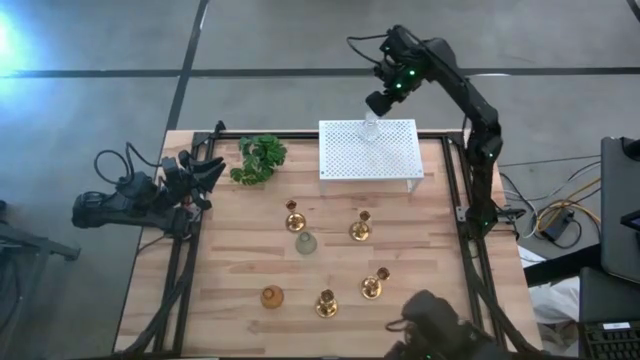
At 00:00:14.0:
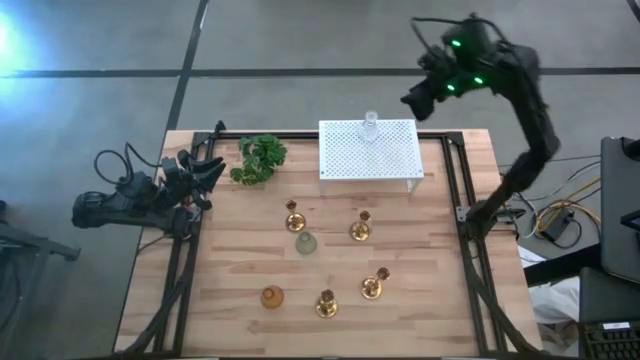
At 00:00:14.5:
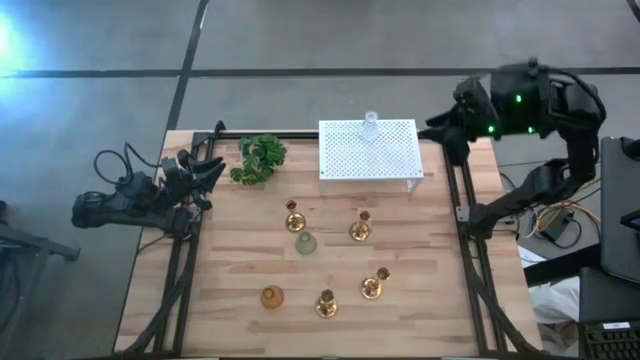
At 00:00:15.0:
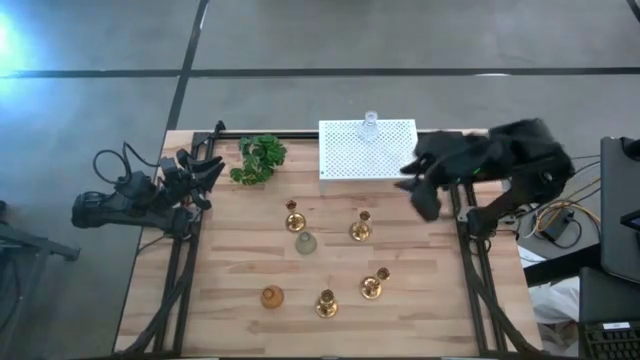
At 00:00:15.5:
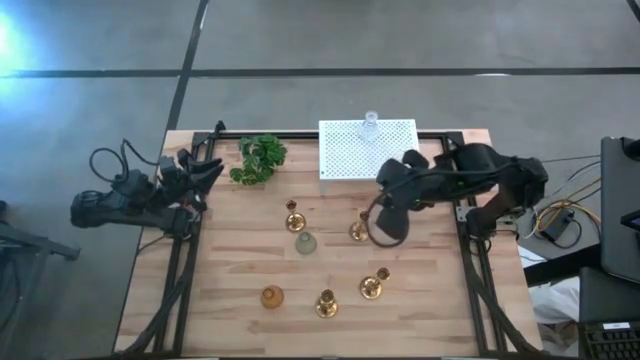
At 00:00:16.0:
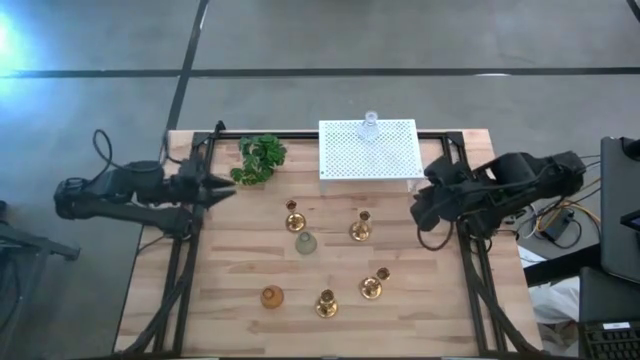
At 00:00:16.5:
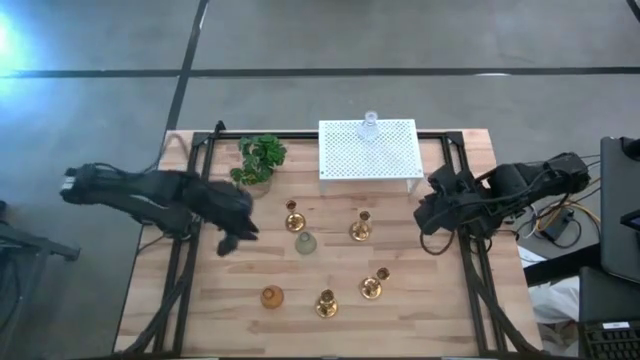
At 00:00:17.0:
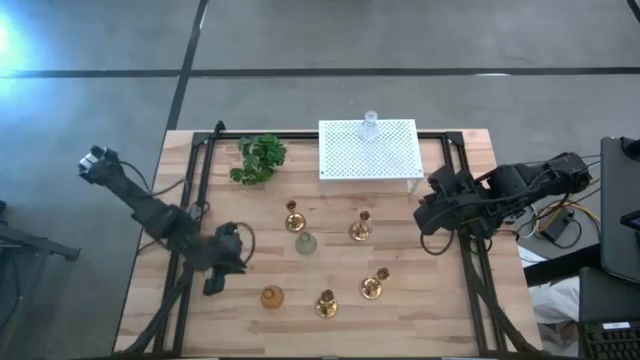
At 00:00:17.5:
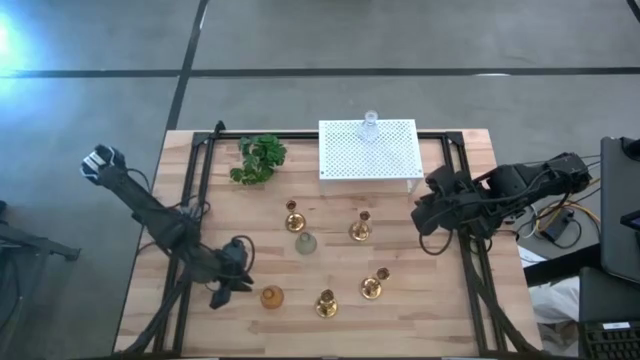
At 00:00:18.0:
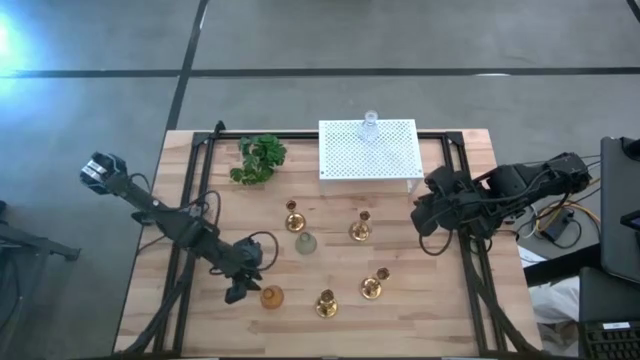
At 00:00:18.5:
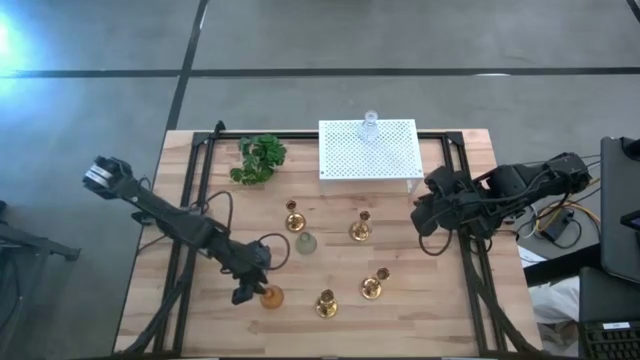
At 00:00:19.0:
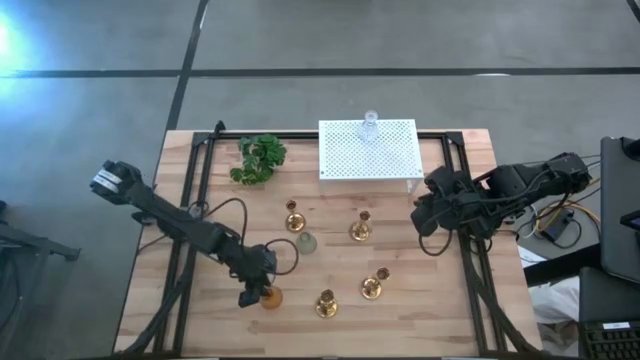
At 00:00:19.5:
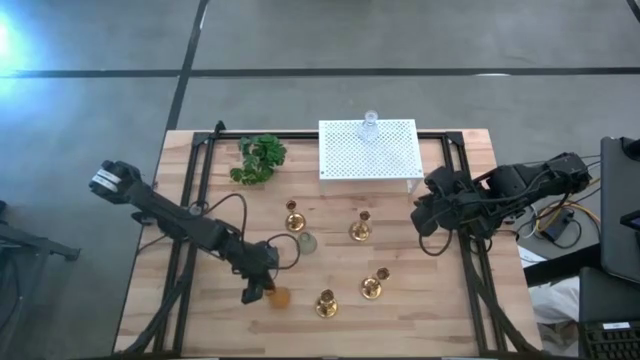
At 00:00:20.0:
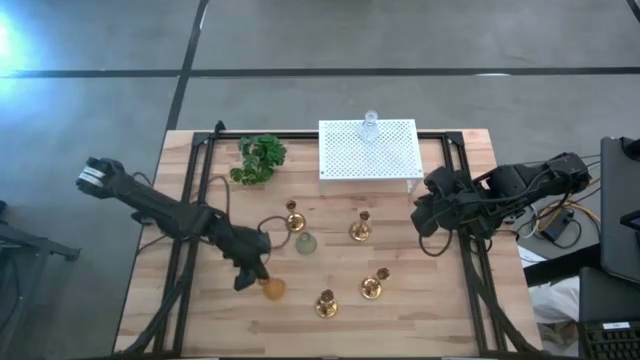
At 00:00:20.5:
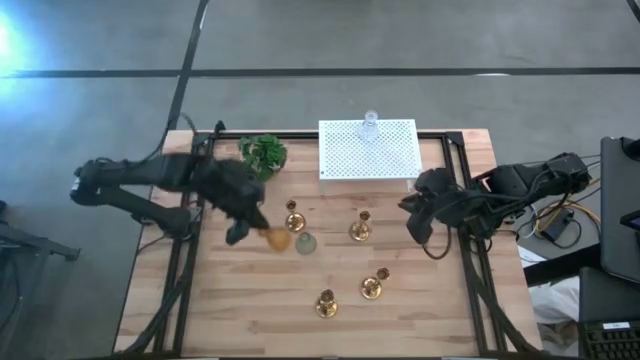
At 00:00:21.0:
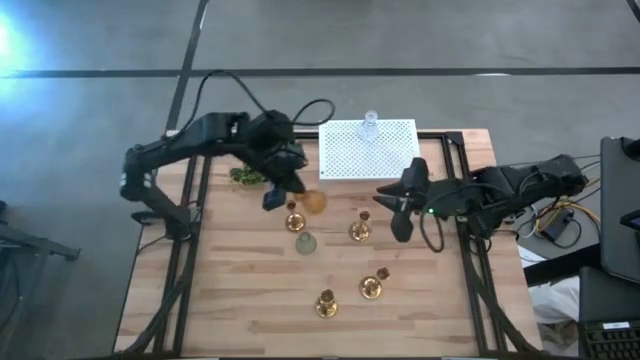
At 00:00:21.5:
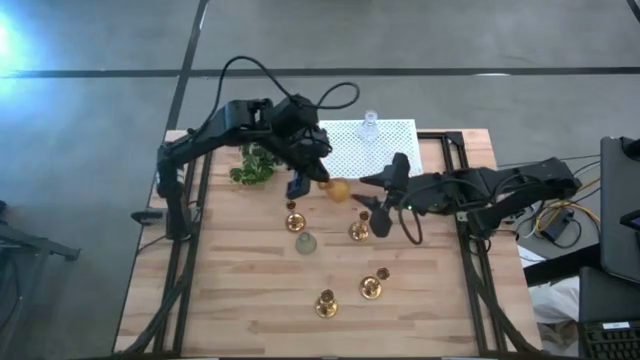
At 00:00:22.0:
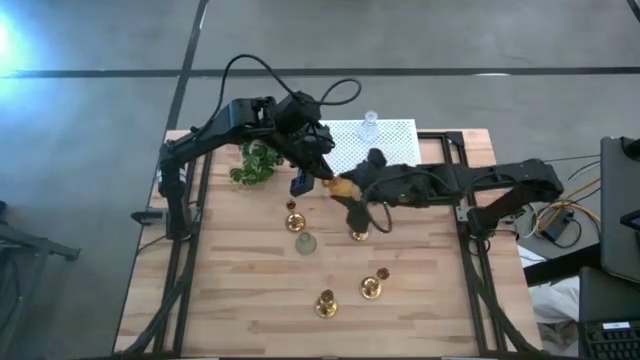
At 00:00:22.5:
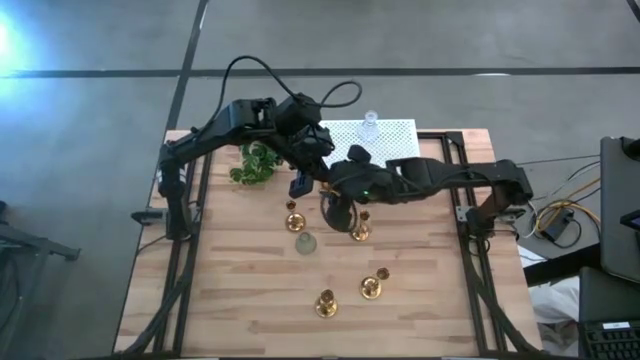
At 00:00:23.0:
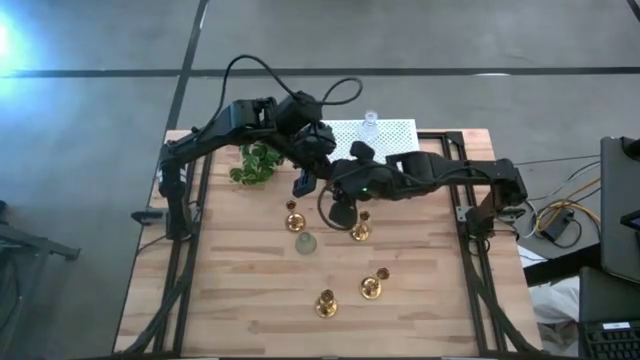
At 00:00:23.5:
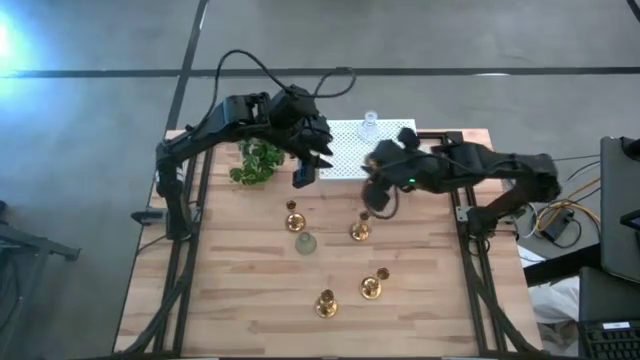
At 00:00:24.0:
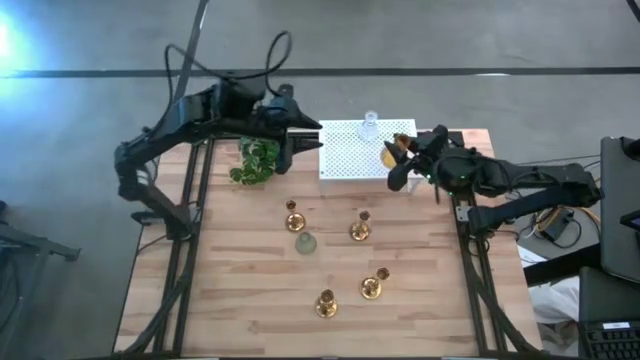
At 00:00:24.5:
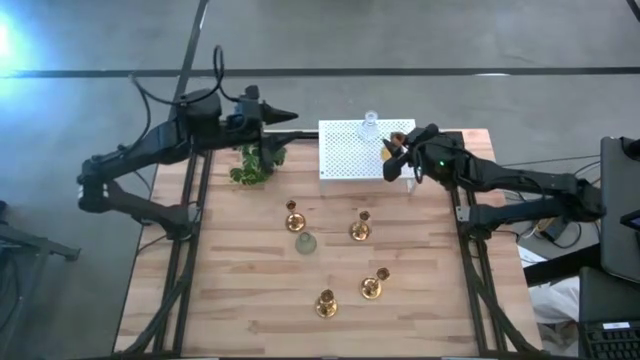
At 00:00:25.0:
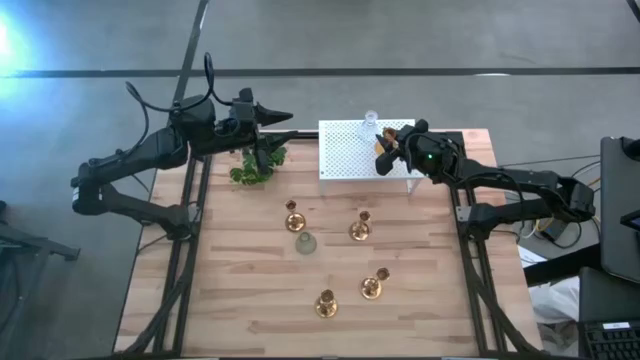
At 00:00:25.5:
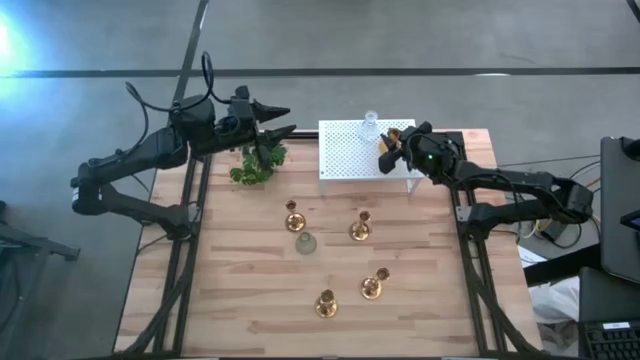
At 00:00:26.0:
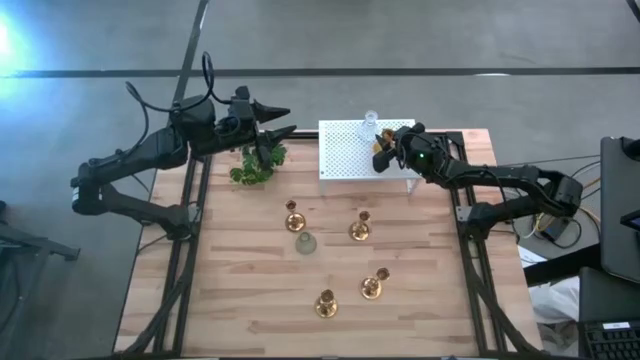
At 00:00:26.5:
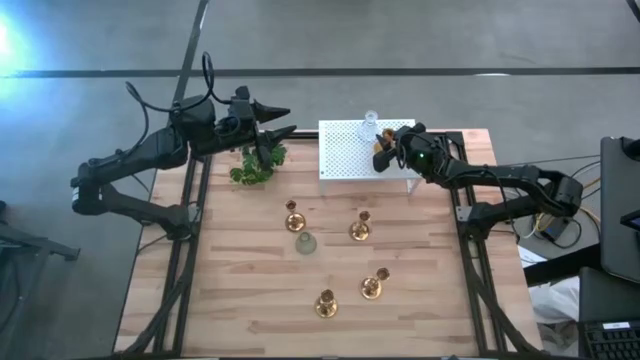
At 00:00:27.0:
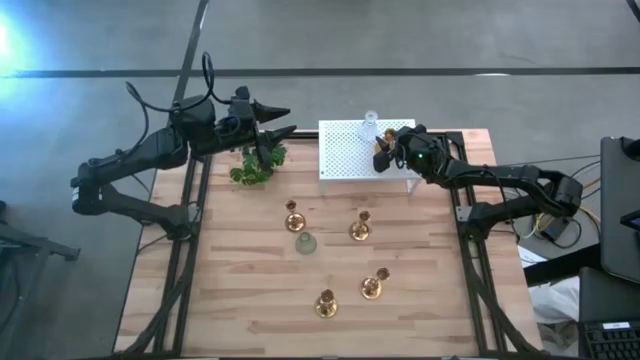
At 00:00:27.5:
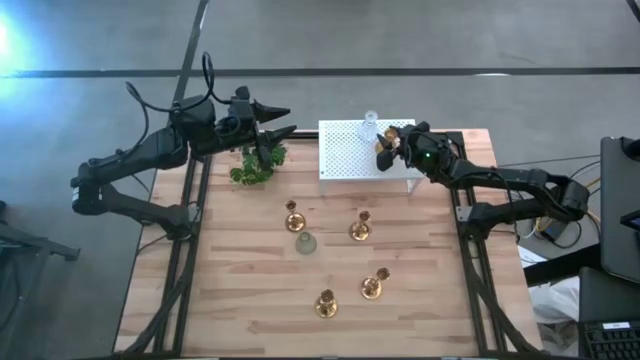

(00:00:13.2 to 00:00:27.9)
Task: Pick & Place candle stick holders
Put the yellow glass candle holder on the shelf

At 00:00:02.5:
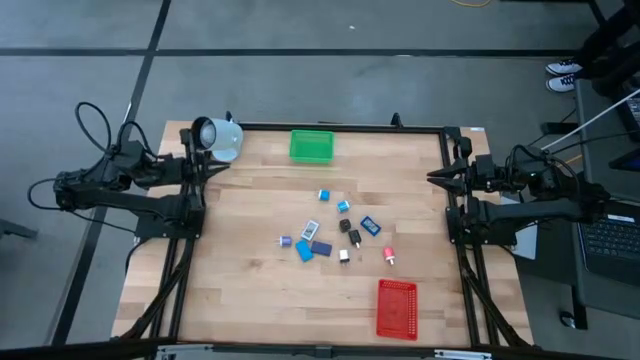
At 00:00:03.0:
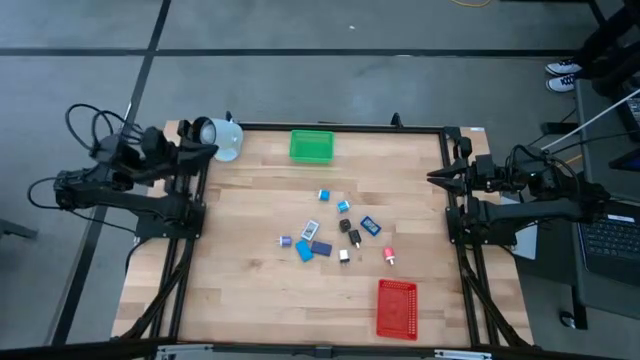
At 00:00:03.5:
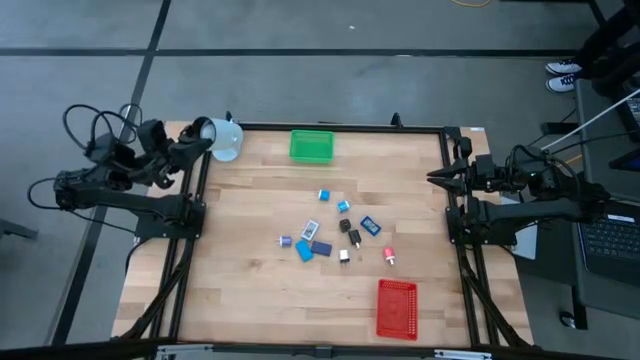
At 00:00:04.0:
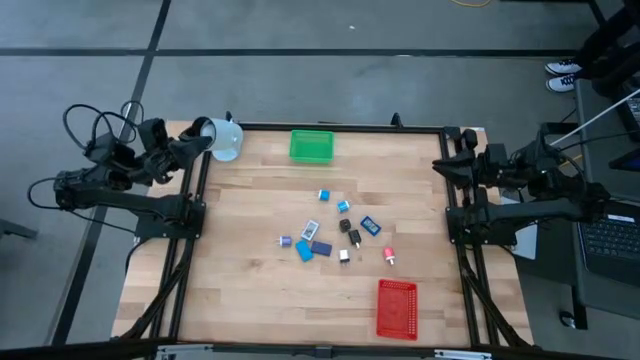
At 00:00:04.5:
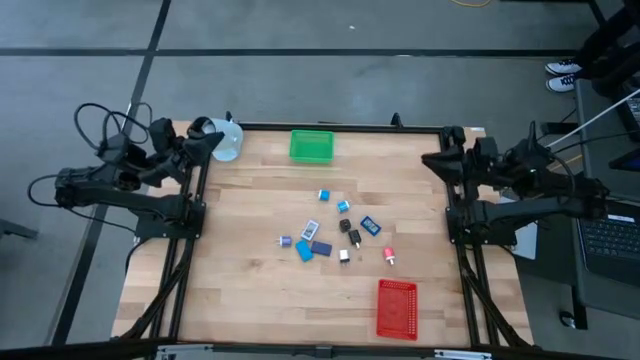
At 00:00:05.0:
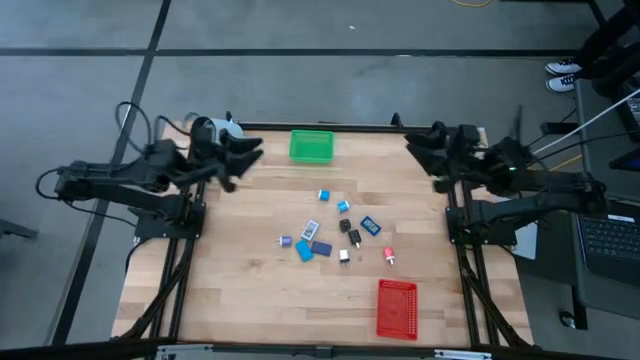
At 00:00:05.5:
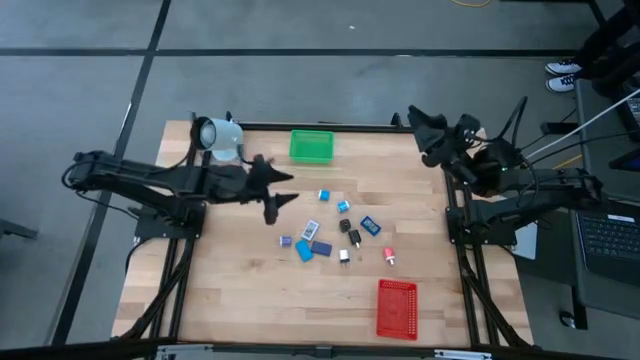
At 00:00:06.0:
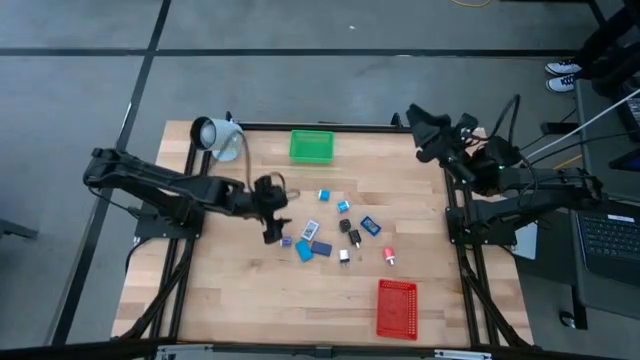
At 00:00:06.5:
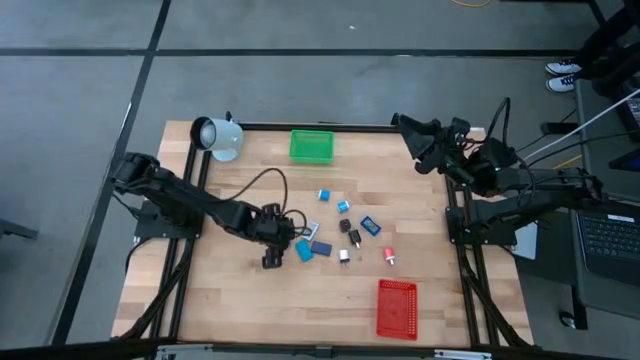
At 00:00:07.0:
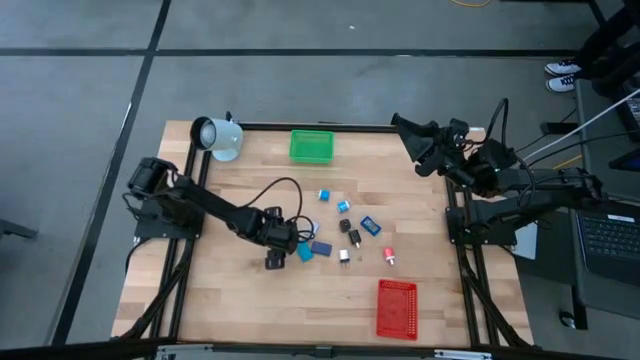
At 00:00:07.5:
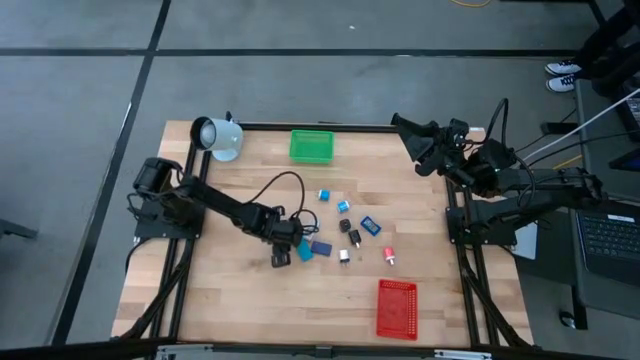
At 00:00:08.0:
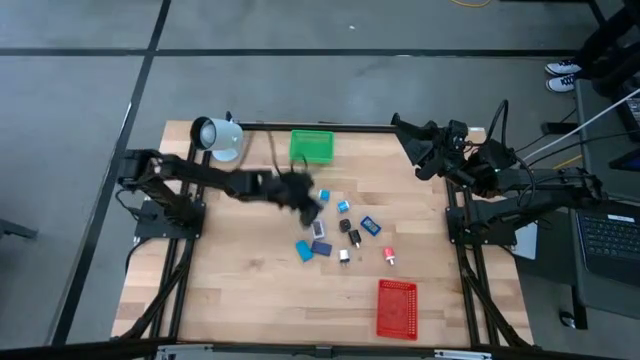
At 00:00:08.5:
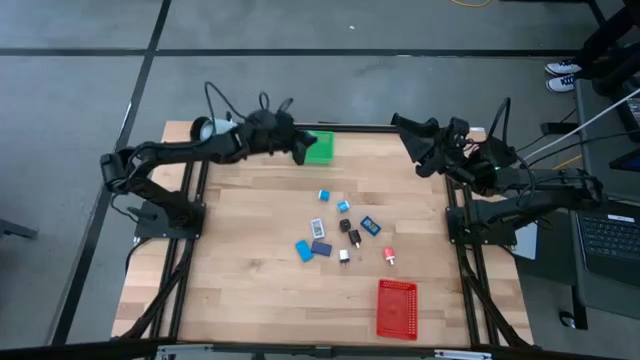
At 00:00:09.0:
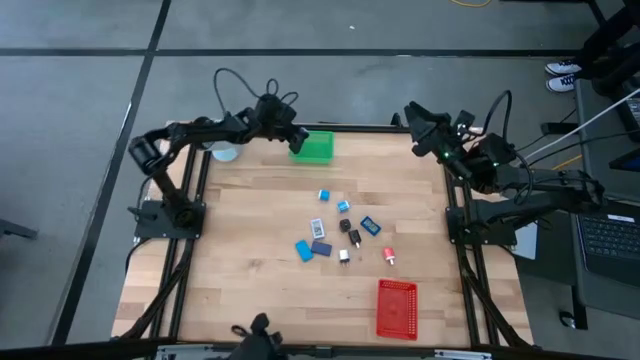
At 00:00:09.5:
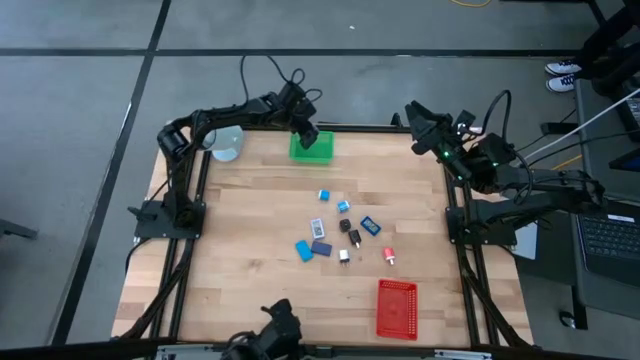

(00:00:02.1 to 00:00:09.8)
Task: Pick & Place Office items
Put the dark blue charger adapter into the green bin
